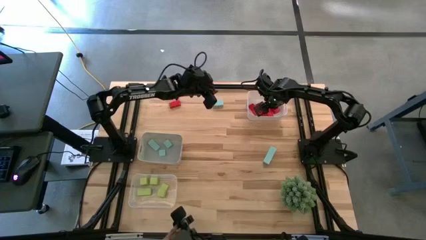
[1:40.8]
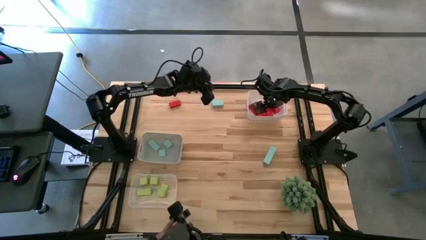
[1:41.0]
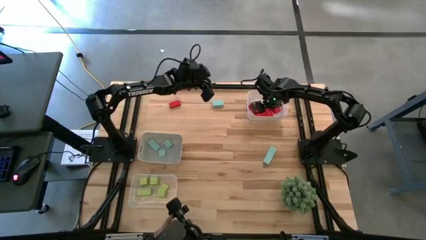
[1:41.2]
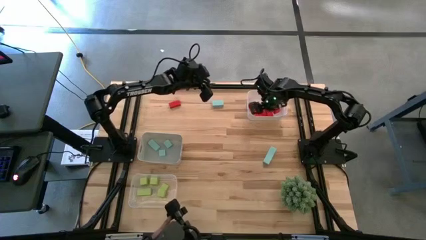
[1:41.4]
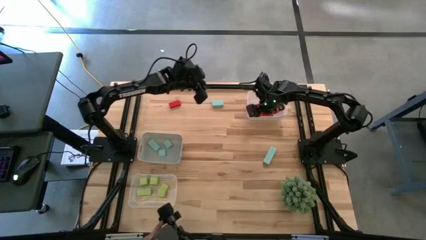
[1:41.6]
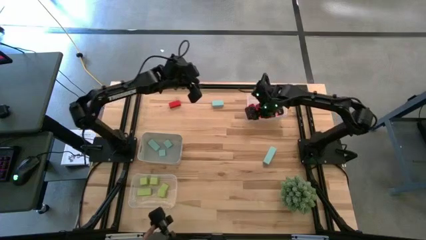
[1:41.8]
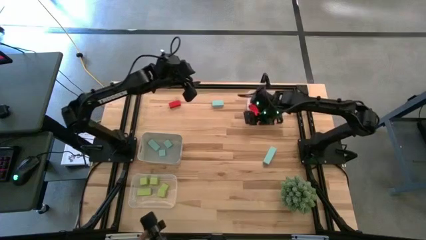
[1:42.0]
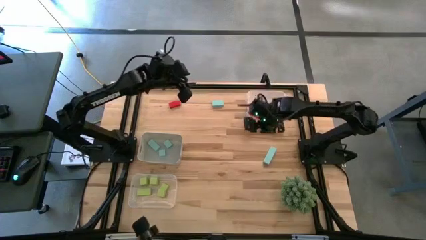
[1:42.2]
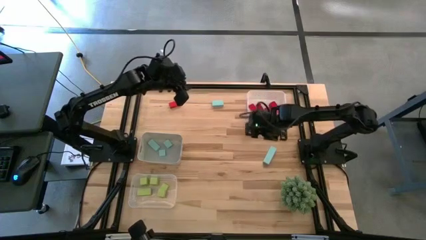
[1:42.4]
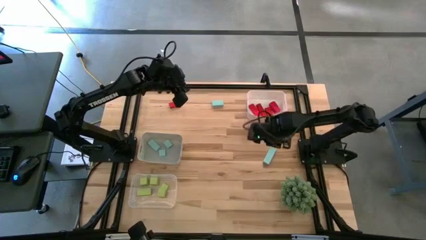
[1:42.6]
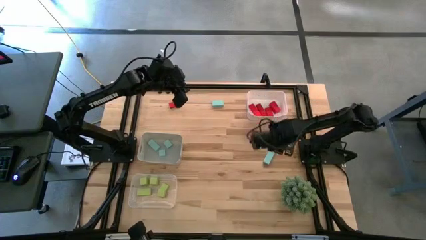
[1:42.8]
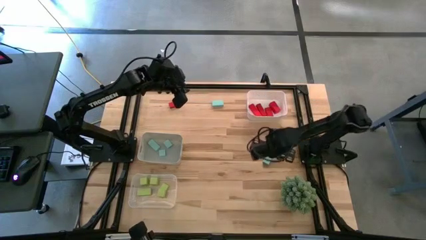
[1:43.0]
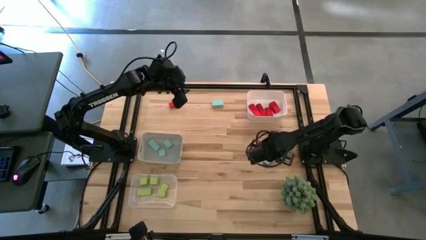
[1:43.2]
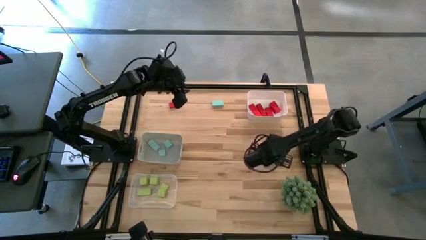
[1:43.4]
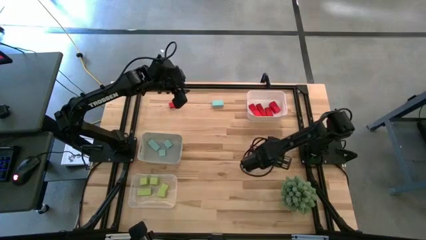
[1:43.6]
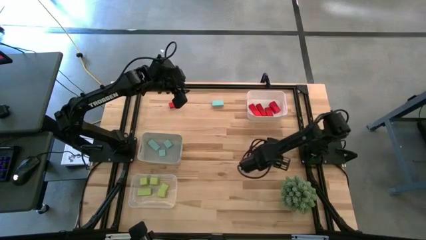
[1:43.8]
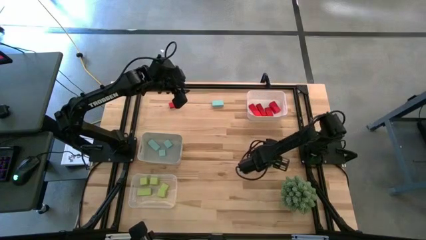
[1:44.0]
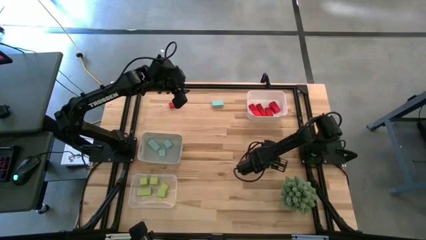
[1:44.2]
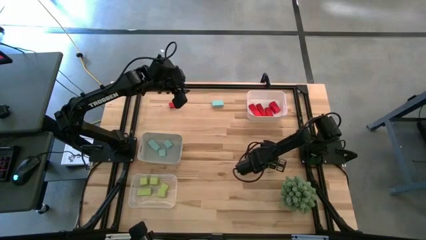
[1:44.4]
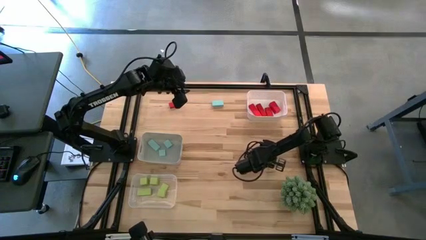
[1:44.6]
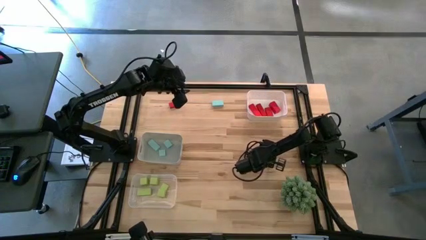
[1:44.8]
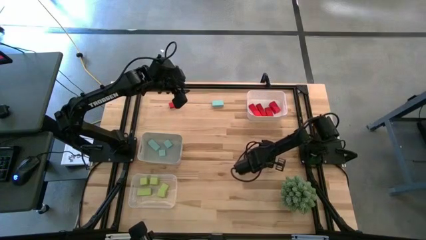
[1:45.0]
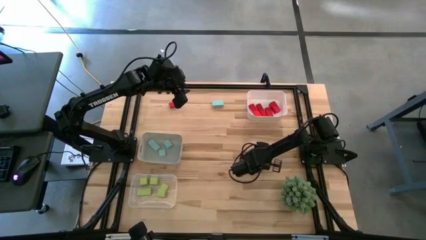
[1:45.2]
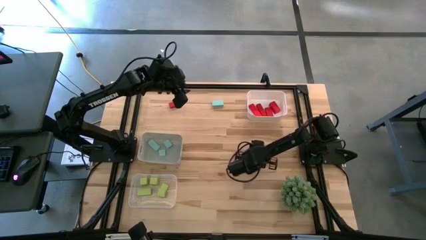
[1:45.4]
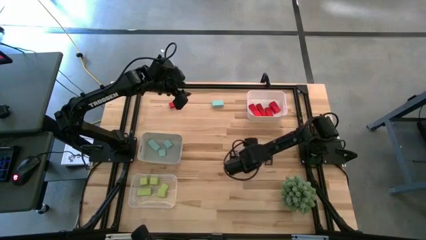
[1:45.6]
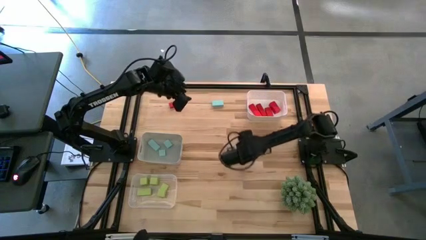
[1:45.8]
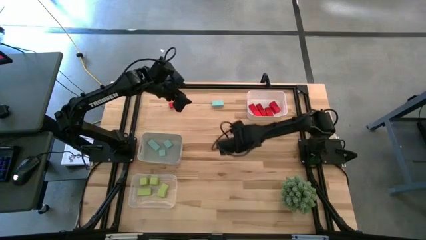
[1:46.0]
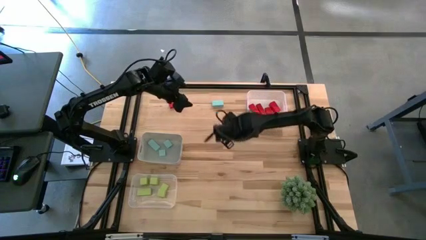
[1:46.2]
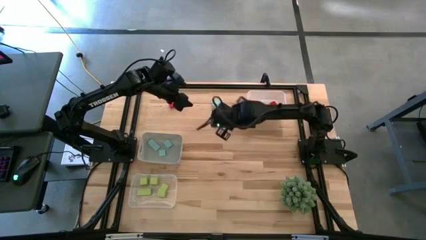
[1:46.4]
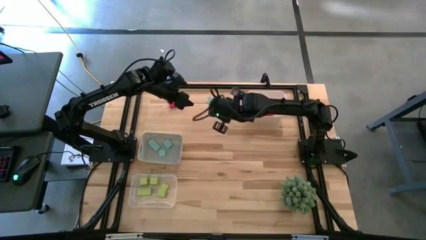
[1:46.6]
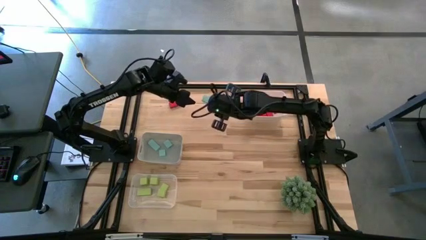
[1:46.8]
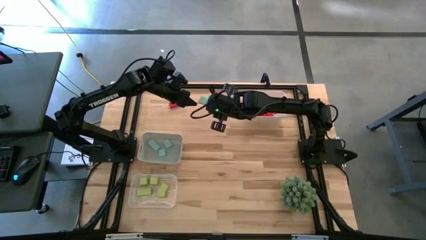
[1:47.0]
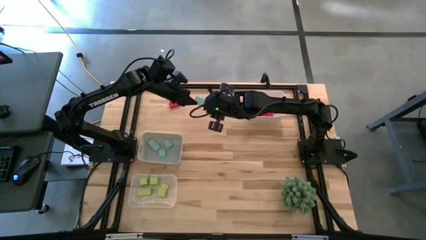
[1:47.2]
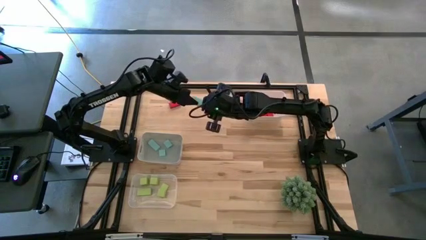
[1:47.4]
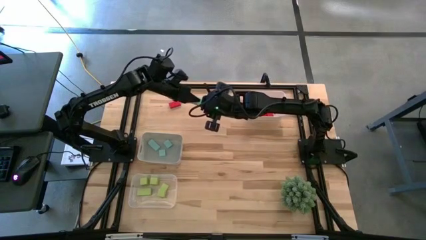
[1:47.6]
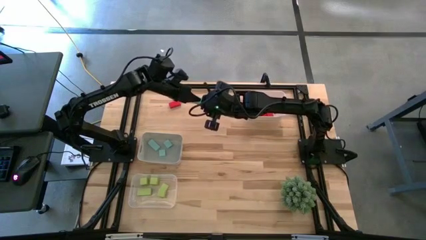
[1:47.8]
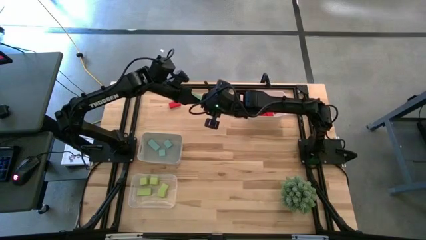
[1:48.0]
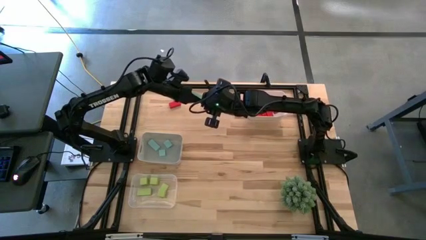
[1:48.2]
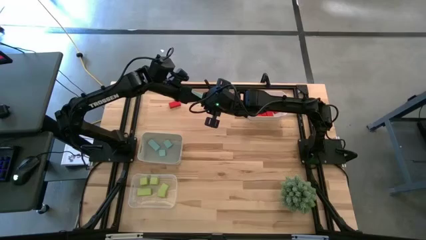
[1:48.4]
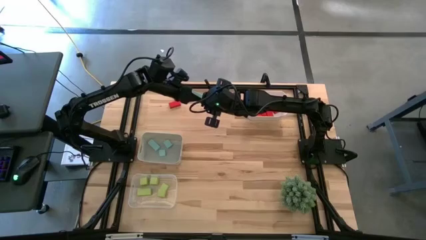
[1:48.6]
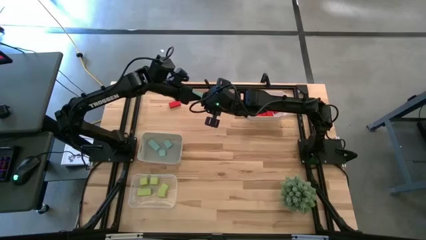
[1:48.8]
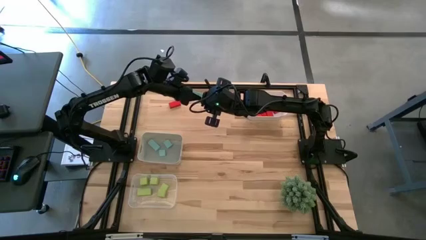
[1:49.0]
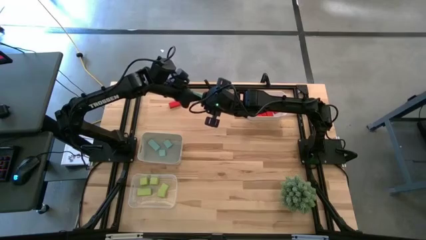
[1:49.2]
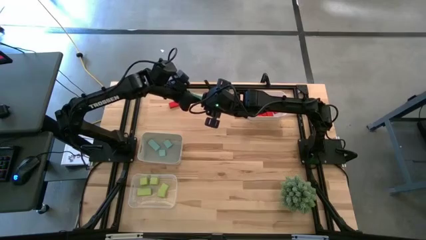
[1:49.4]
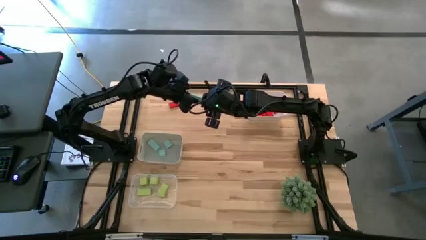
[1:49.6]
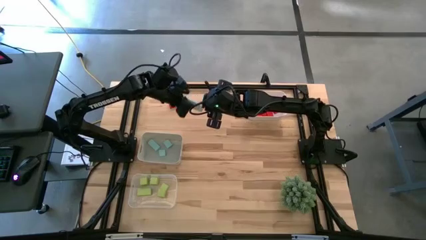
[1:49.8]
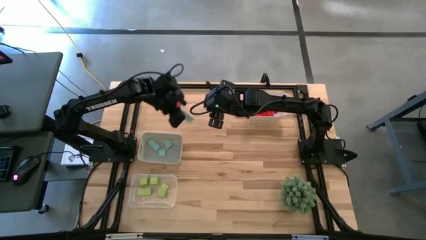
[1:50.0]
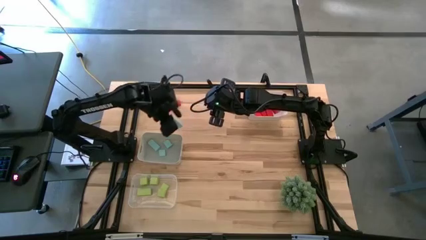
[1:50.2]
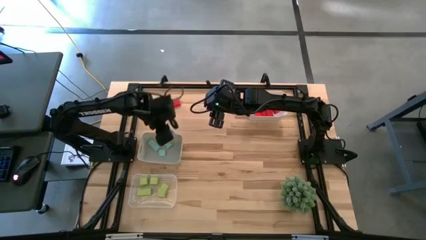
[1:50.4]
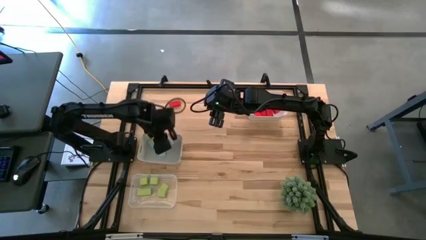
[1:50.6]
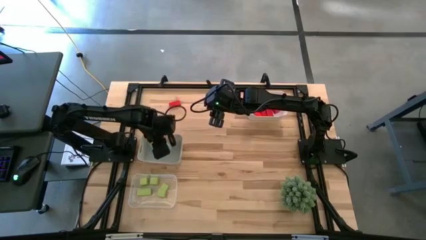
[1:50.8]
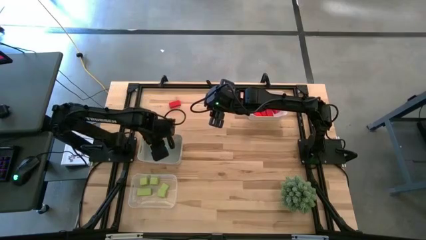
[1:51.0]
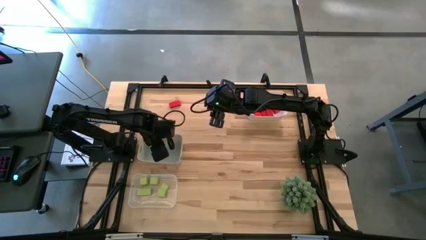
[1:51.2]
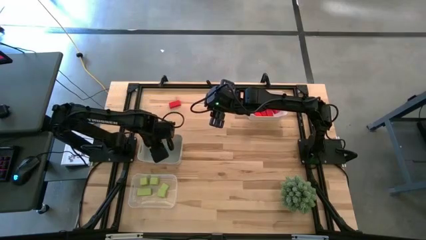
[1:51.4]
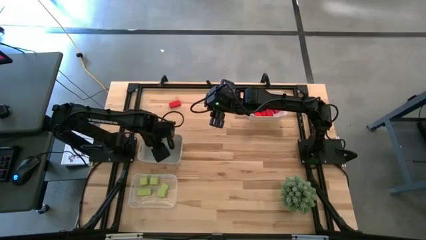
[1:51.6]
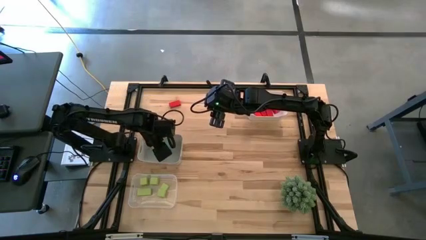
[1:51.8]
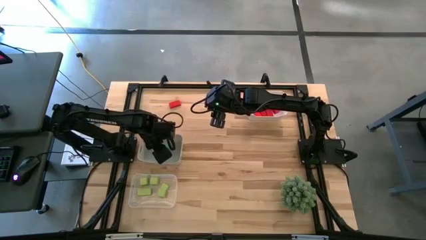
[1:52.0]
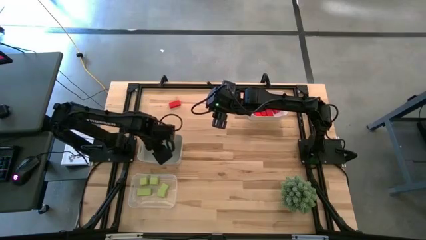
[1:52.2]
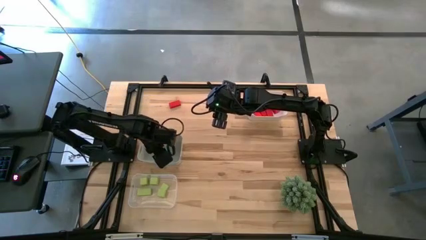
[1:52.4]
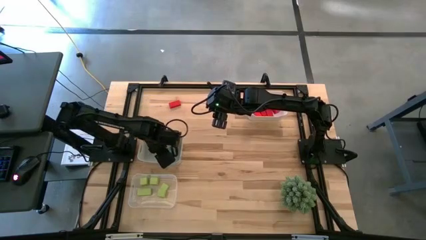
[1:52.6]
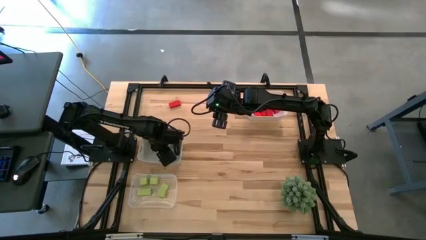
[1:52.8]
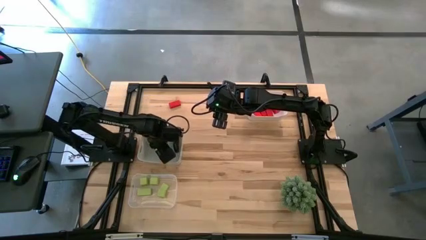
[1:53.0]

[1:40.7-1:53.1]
Task: Sort & place blocks by color
Put the blue block into the gray bin

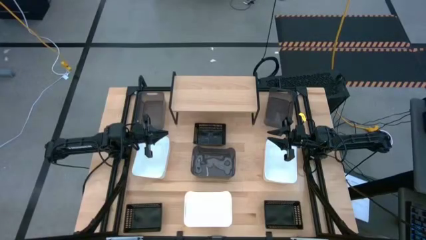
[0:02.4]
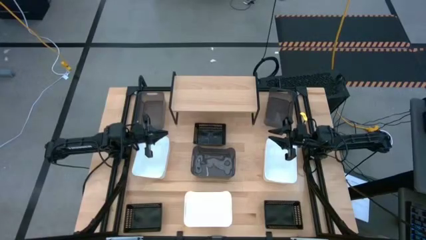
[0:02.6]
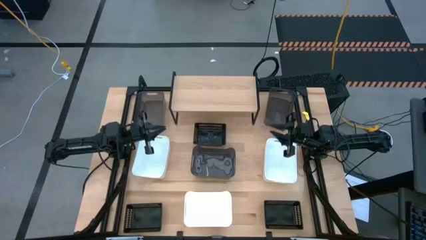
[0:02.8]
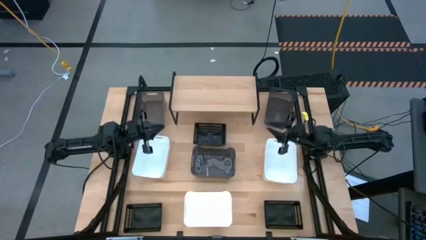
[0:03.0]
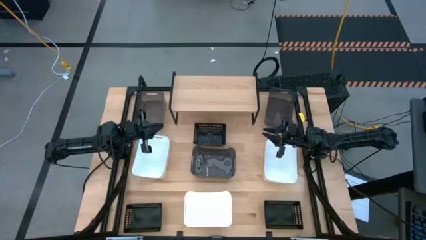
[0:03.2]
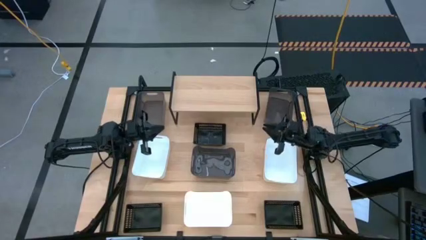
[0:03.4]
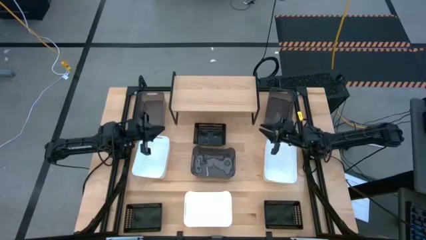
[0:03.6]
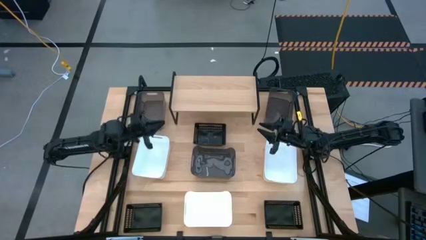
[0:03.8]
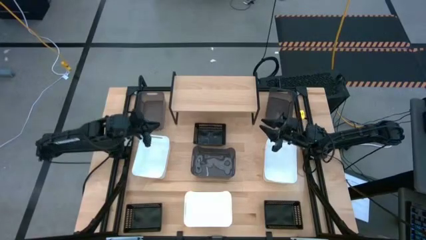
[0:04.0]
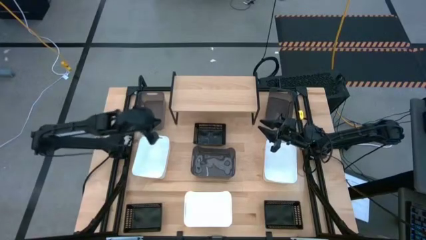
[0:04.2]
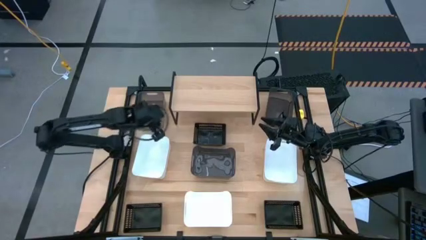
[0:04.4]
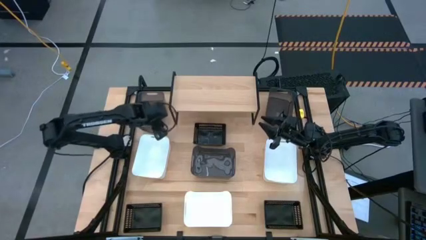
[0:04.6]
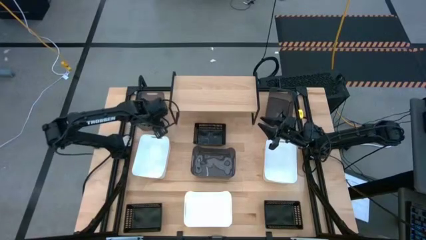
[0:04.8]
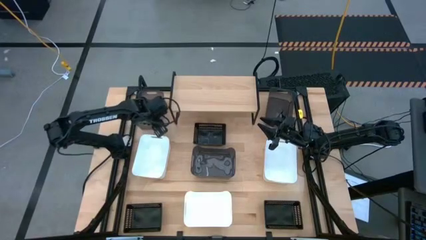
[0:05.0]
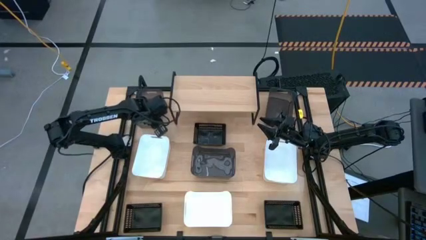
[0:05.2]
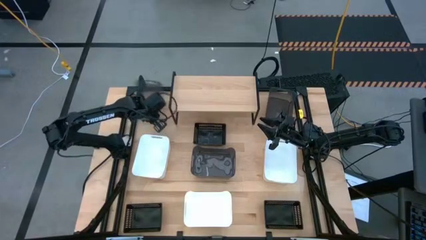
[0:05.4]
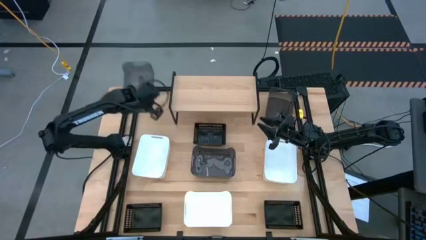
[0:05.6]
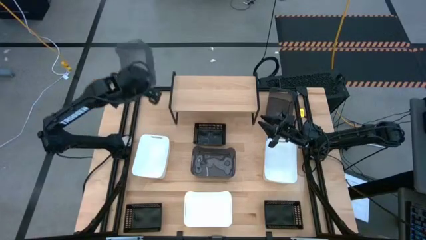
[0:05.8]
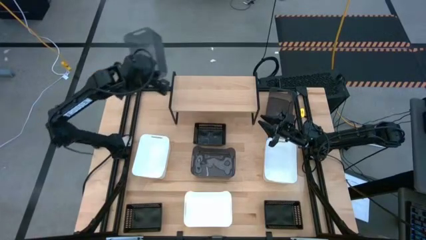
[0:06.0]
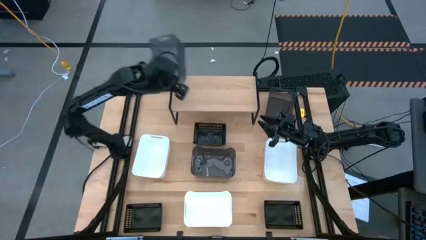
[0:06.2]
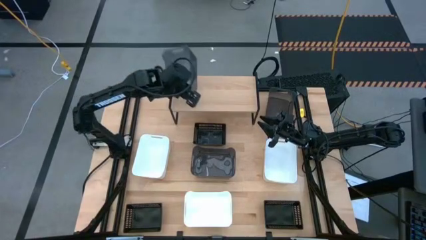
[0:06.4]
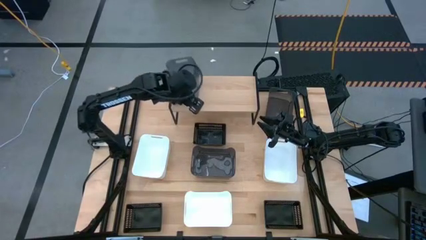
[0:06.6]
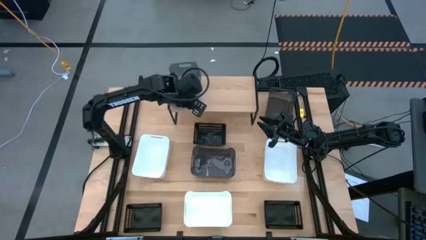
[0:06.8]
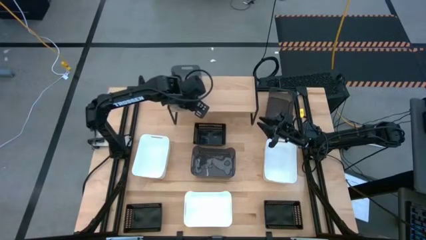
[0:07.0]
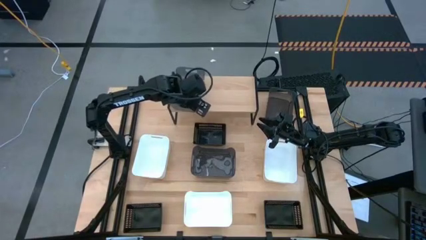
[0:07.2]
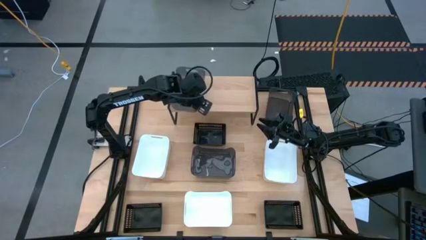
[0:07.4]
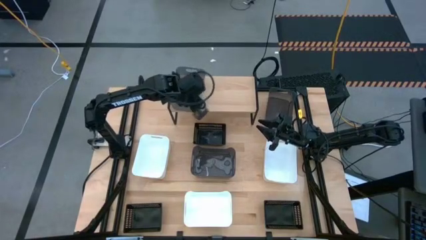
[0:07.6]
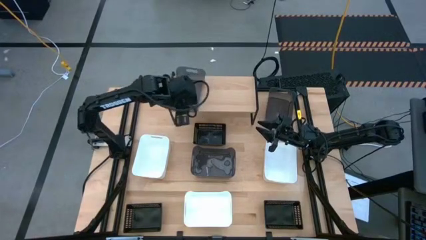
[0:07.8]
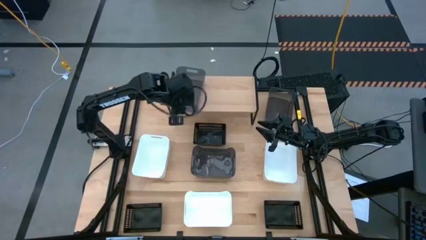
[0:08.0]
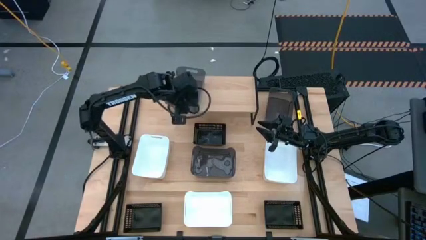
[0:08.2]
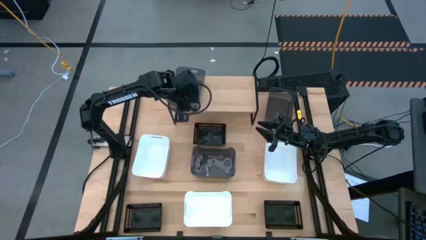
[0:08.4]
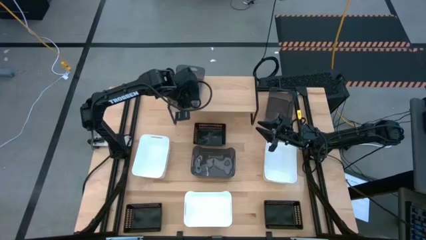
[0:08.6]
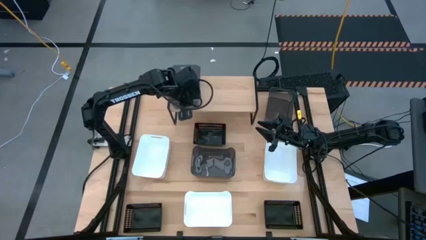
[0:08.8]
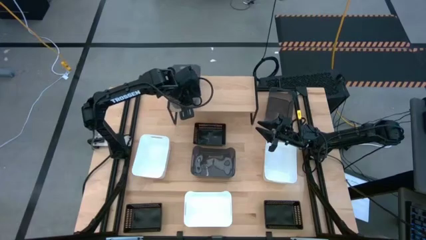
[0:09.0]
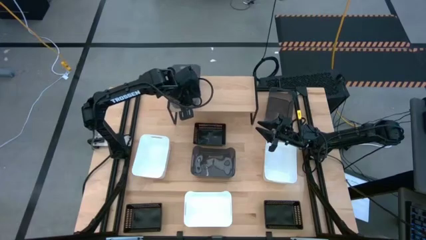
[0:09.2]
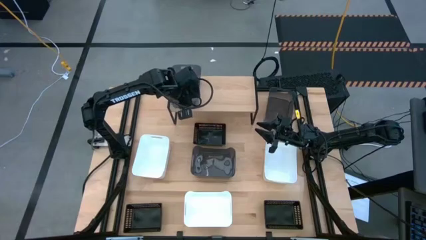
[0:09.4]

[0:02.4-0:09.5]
Task: Stack baskets on shelf by color
Put the top left gray bin on the shelf
